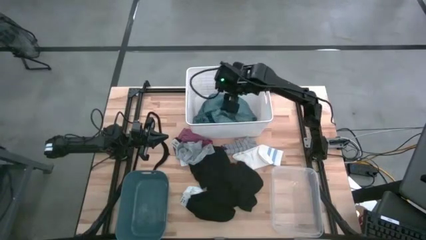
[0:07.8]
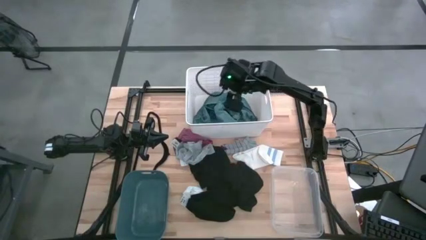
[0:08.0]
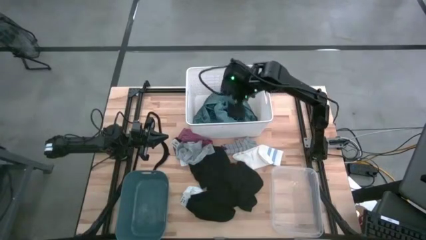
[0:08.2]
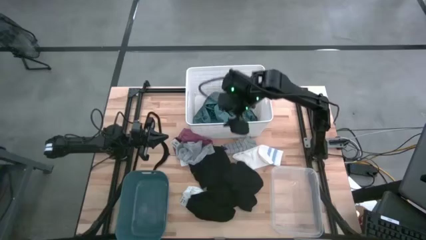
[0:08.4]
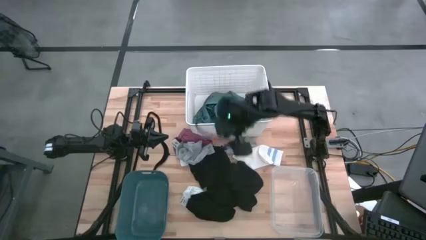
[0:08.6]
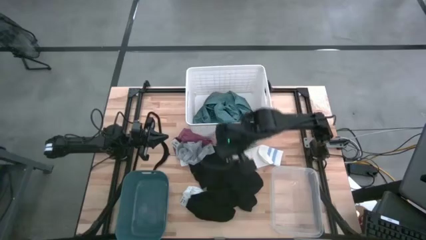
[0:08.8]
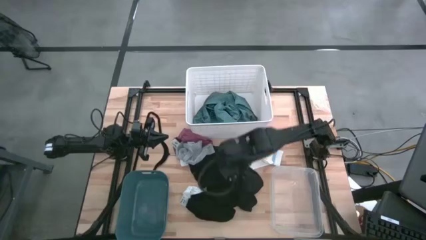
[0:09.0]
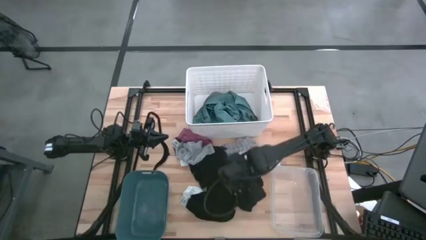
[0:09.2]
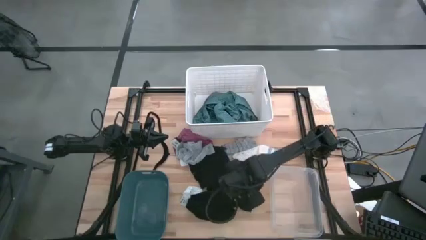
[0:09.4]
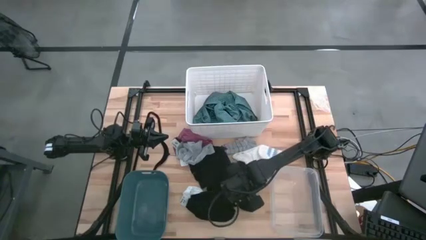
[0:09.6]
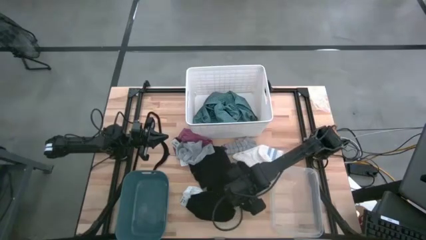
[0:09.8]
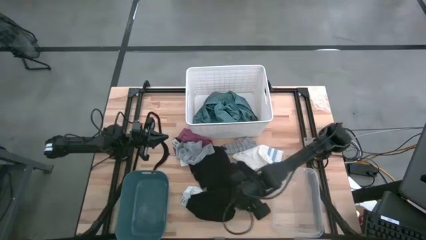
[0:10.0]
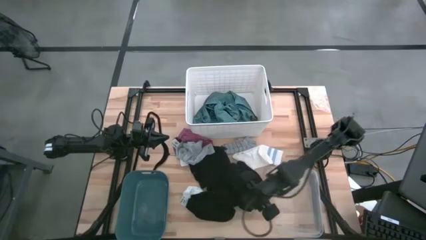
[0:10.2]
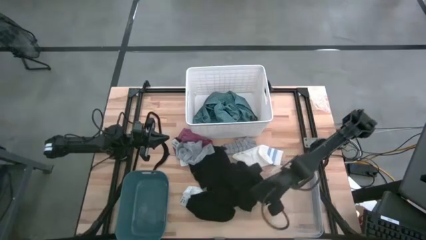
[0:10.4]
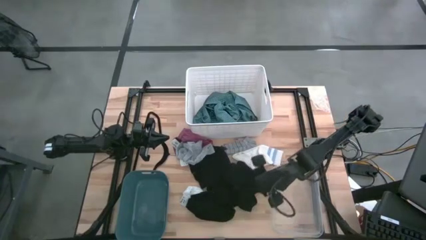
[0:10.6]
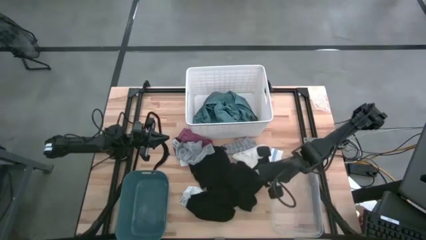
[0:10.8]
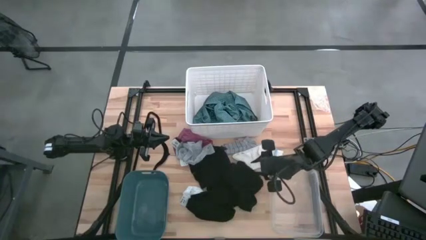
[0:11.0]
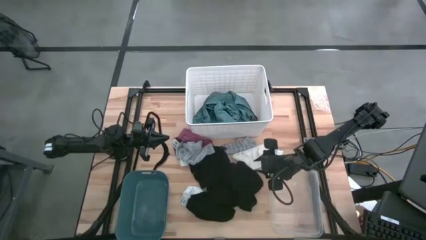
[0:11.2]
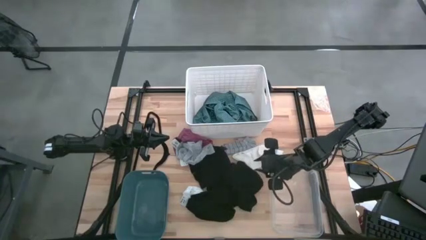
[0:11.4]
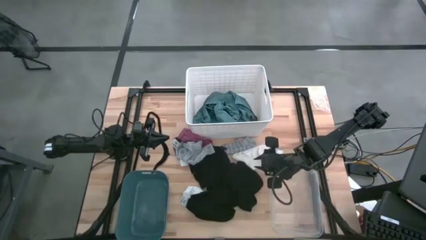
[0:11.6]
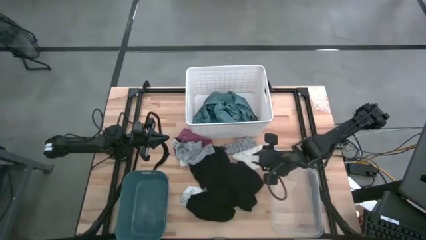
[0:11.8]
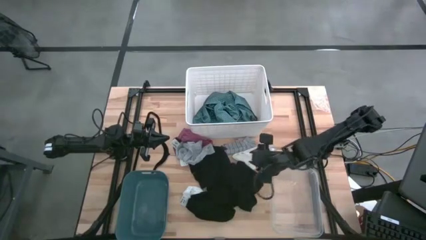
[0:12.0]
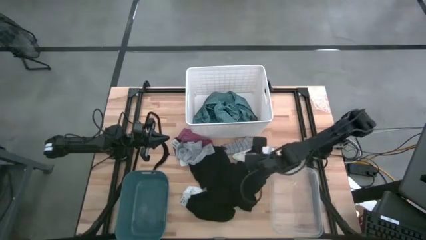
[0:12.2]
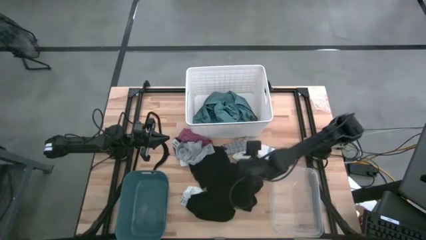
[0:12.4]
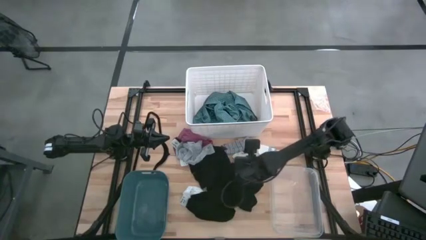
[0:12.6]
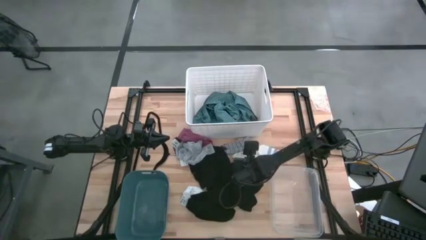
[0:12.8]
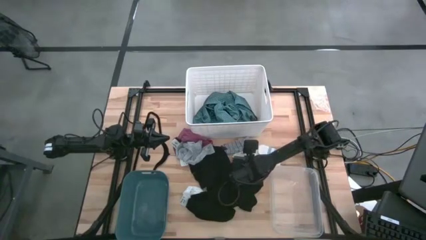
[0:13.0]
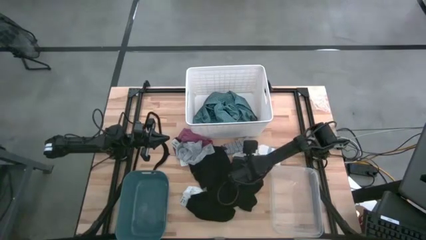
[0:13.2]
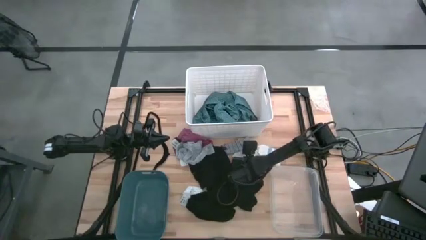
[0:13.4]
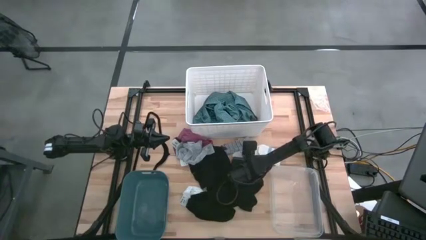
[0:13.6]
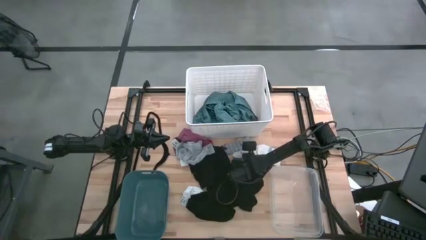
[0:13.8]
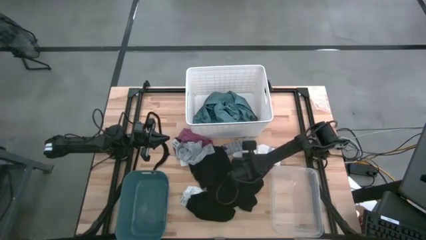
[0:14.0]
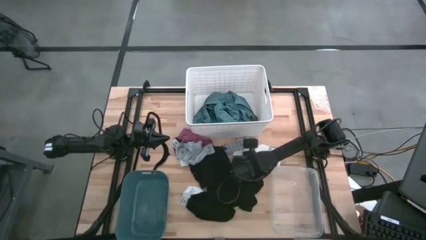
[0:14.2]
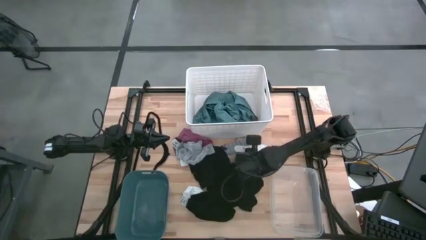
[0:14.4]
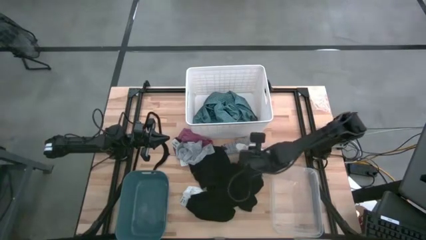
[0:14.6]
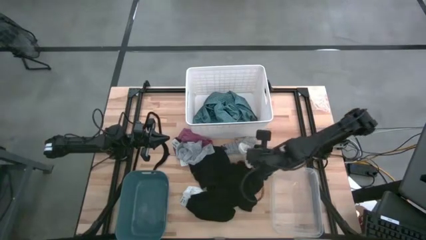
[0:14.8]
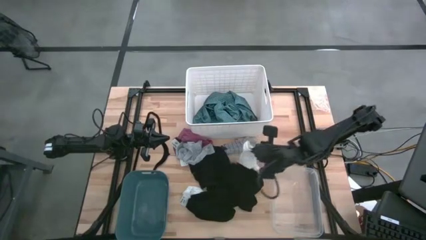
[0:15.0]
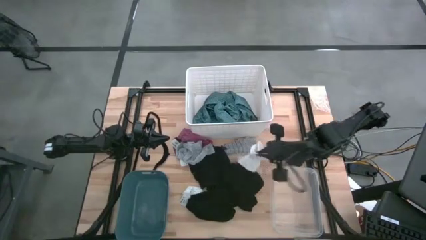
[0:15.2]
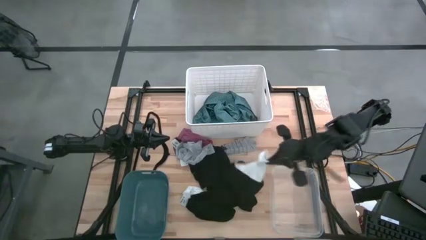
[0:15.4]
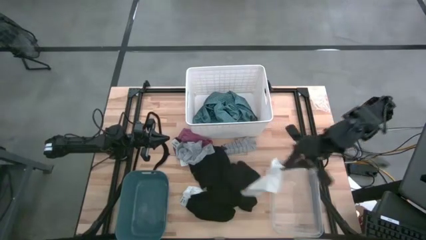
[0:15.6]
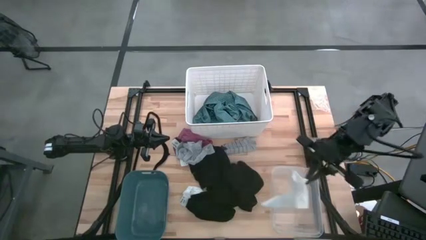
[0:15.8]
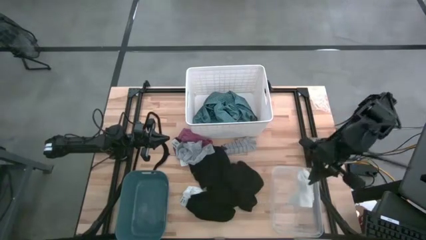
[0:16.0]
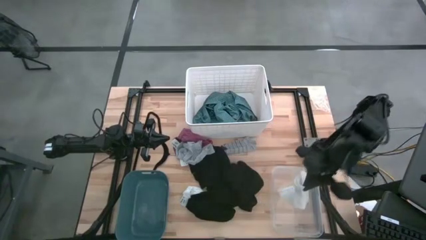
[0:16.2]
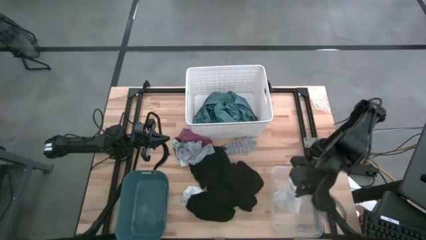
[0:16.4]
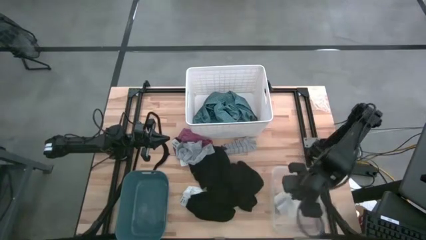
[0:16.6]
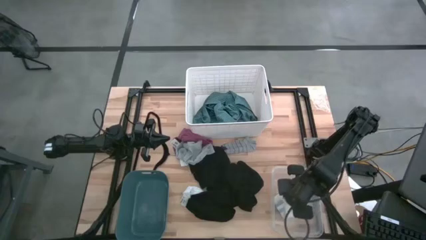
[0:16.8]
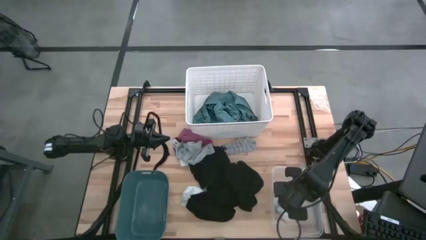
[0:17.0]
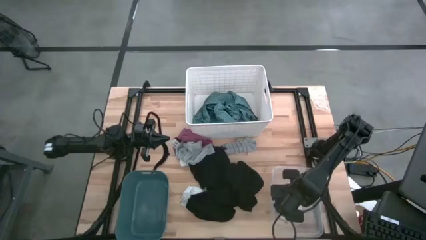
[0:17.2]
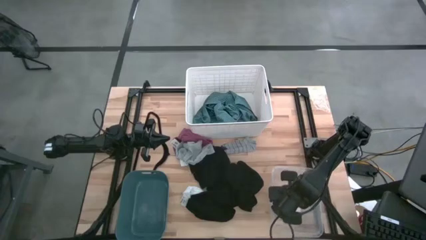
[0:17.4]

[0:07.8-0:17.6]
Task: Pick & Place Cloths
Put the white sock into the transparent container

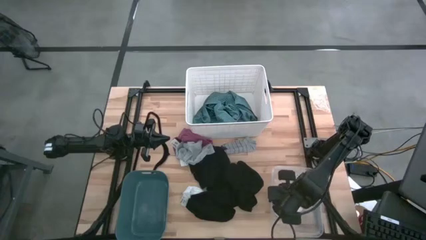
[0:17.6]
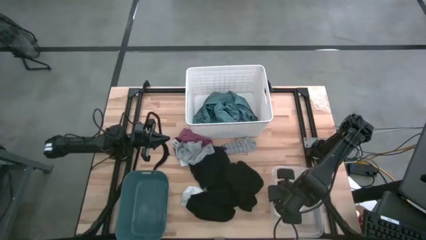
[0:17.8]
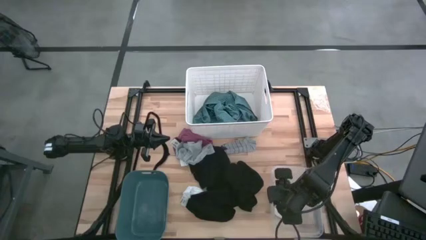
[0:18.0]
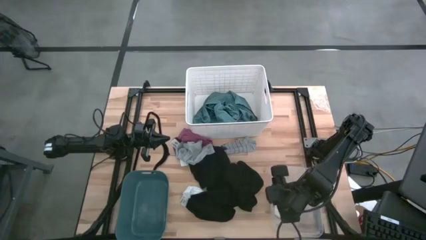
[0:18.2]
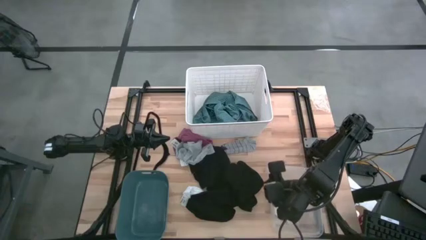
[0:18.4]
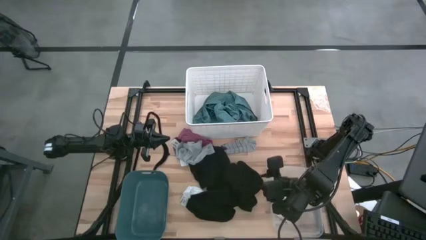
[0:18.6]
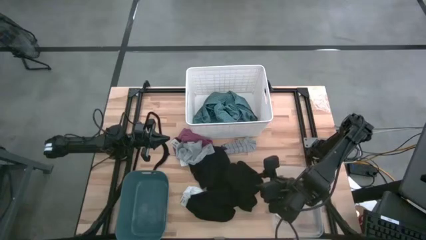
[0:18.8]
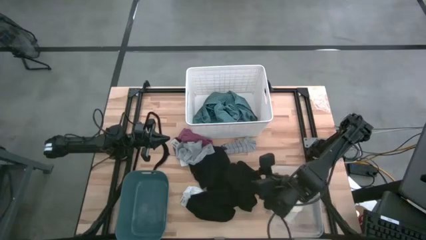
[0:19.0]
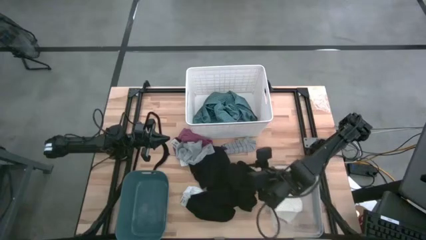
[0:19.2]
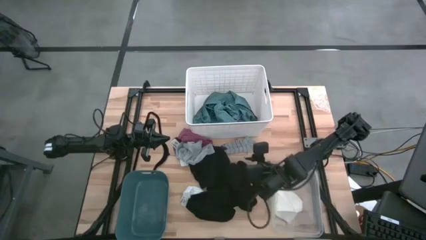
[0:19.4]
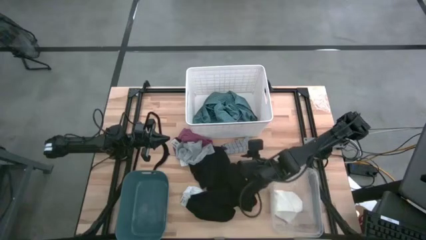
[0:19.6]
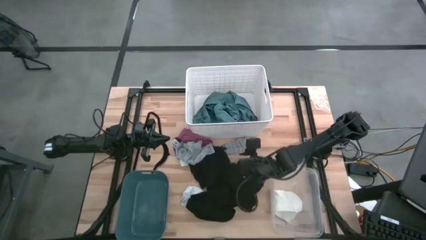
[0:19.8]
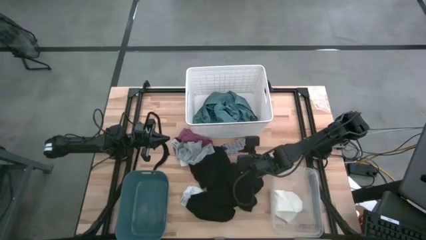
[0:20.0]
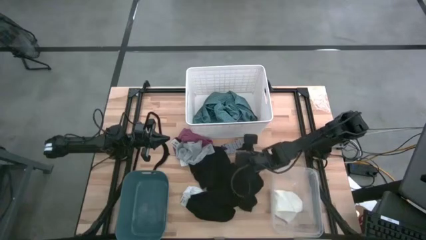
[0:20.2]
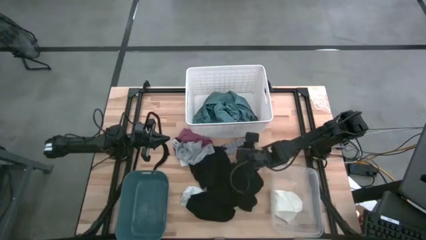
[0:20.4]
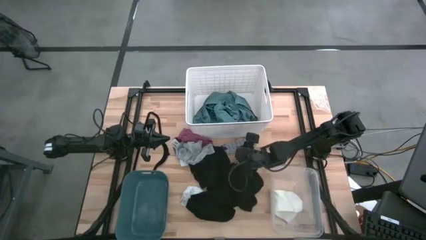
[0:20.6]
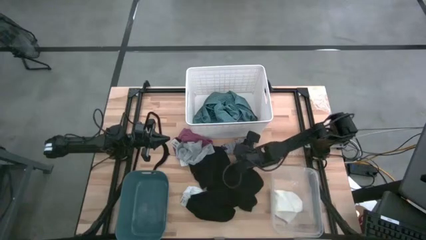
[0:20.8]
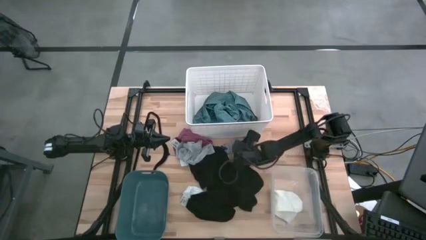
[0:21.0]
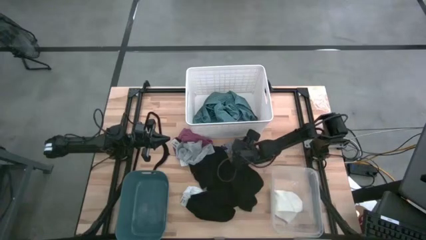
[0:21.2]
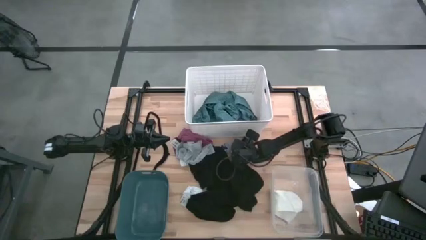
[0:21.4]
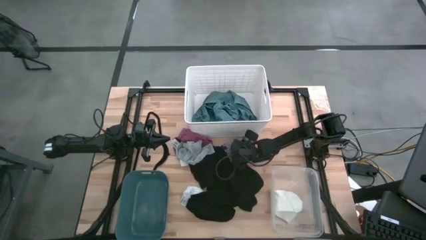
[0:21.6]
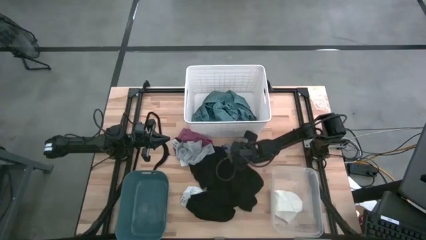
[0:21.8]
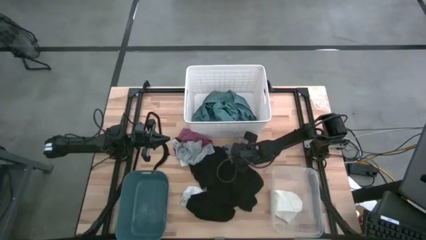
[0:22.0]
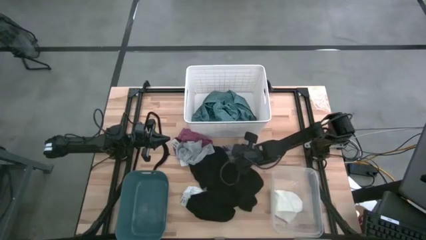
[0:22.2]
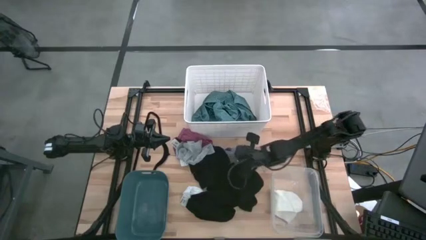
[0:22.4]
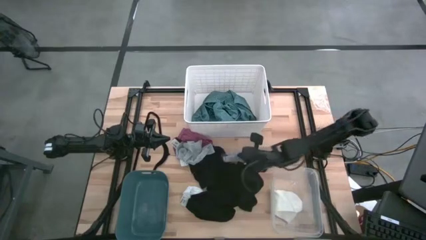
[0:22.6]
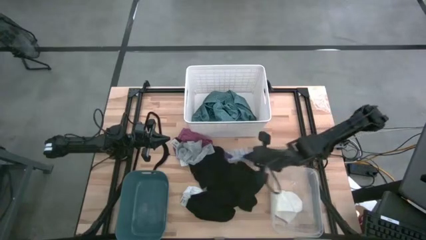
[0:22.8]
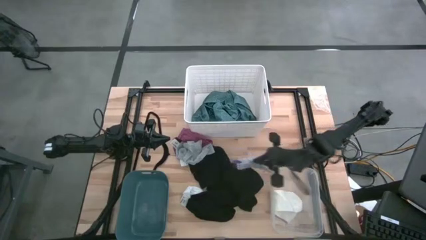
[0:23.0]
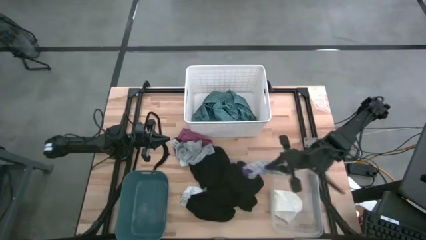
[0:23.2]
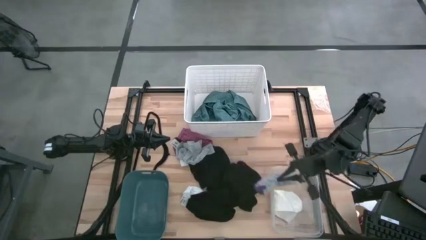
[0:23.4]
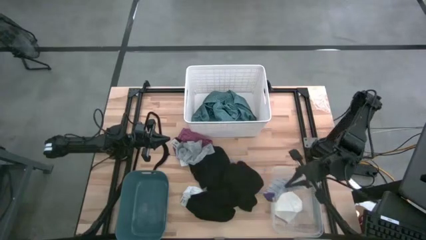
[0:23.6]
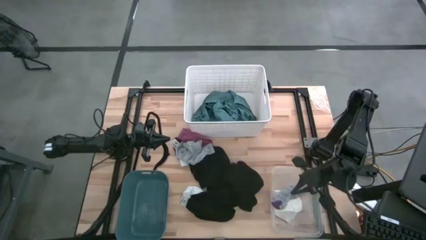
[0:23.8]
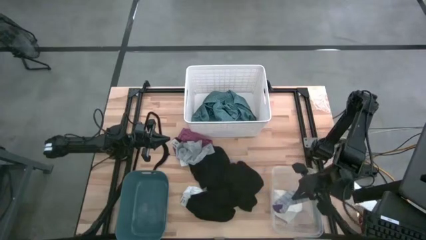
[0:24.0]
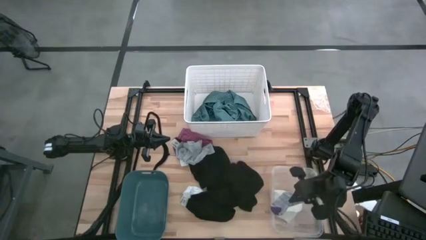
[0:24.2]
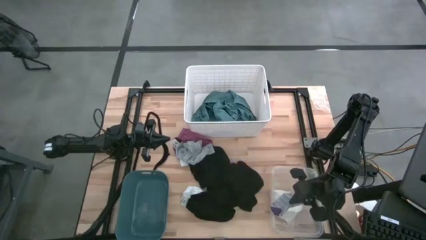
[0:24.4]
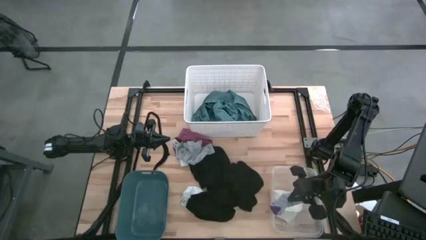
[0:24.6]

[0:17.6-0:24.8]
Put the gray sock into the transparent container
